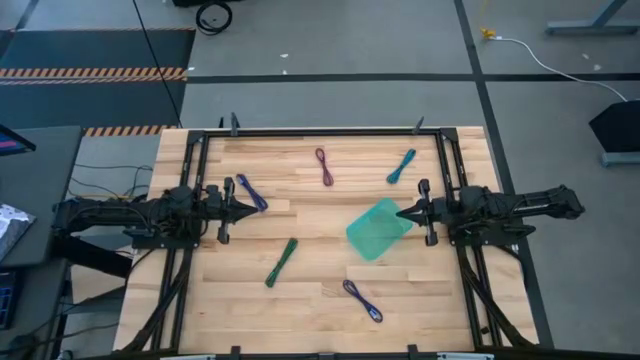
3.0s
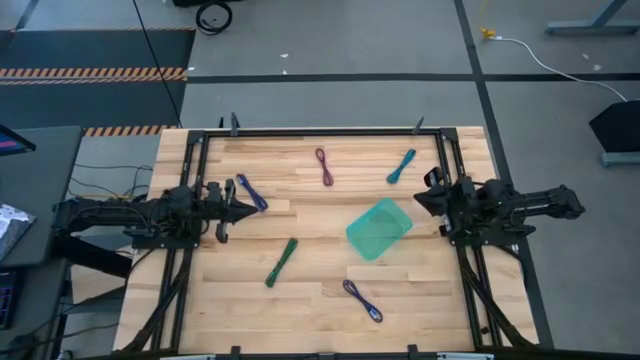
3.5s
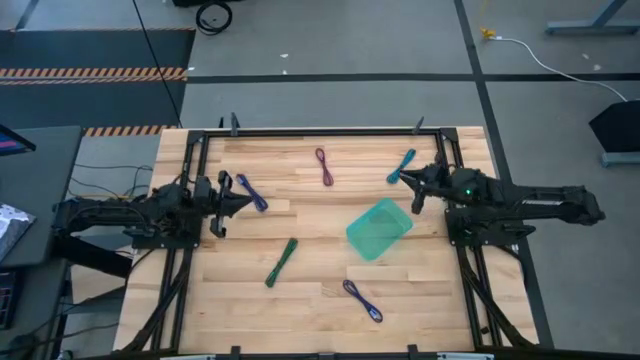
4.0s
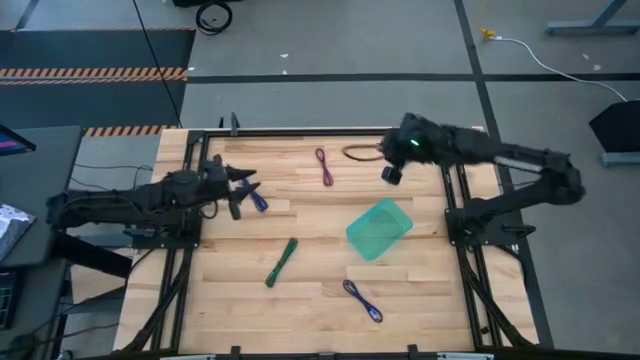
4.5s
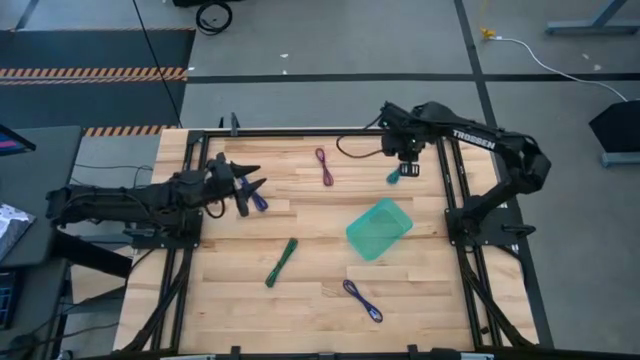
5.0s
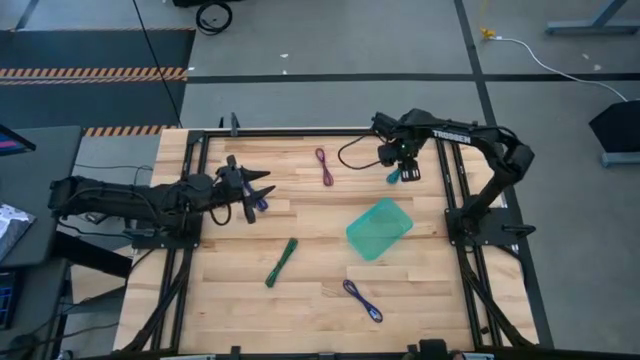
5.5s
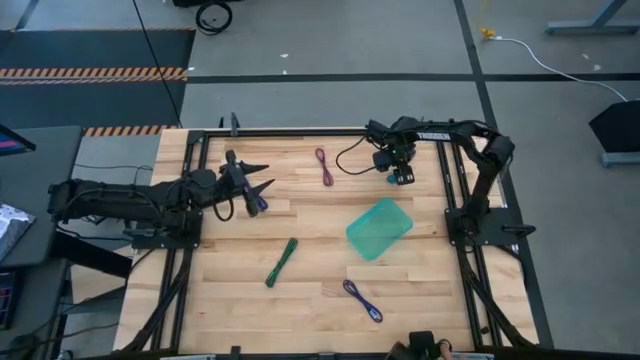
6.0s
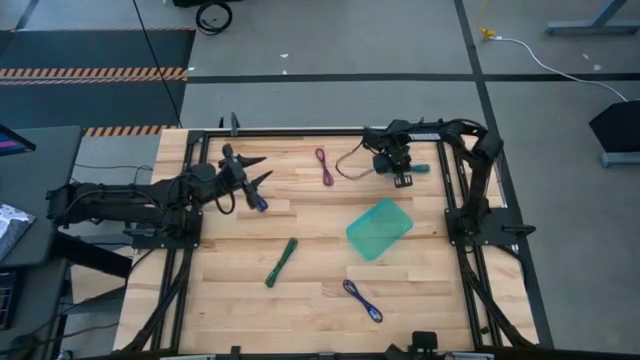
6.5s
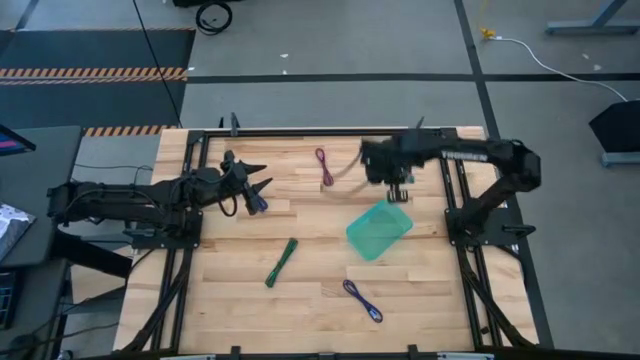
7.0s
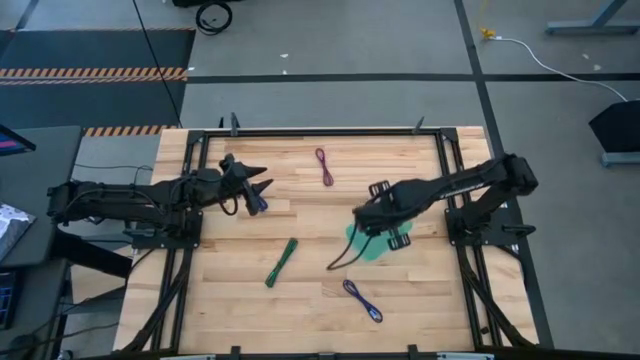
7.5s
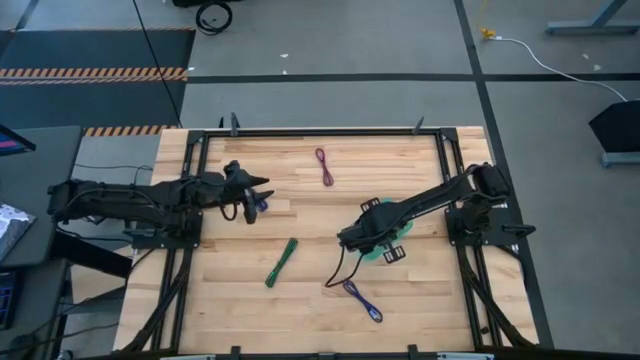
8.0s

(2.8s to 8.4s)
Task: Pick and place USB-C Cables
Put the light blue charger cable into the green bin

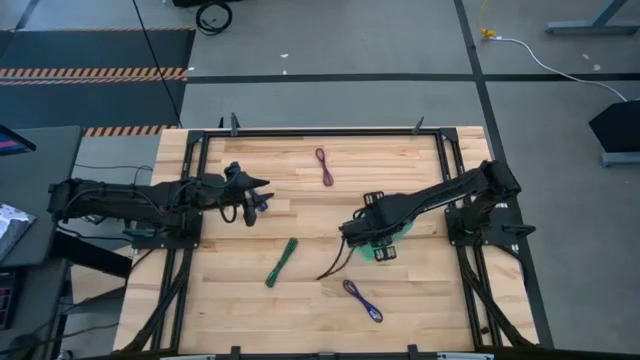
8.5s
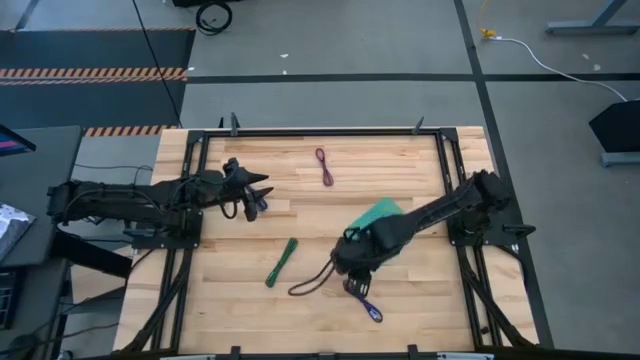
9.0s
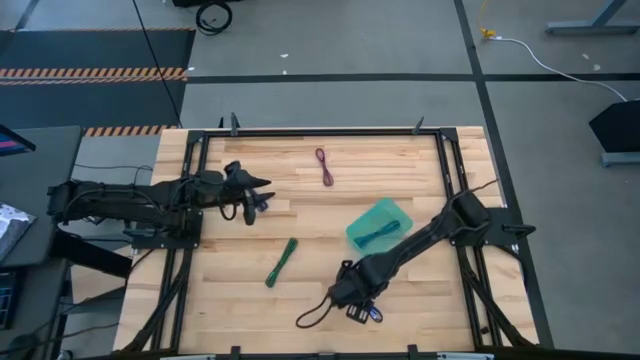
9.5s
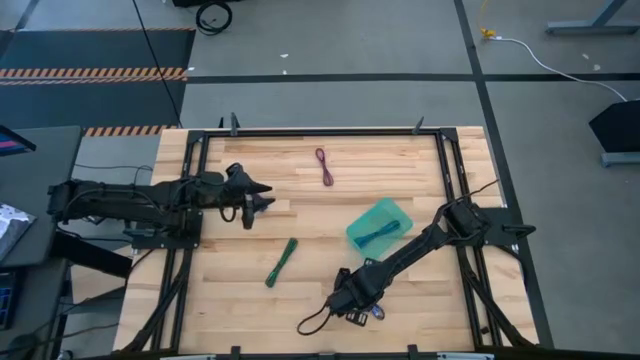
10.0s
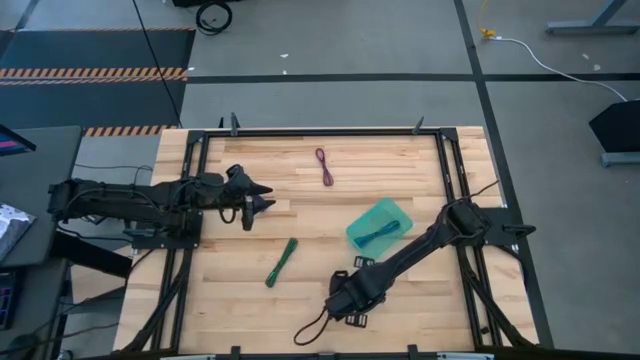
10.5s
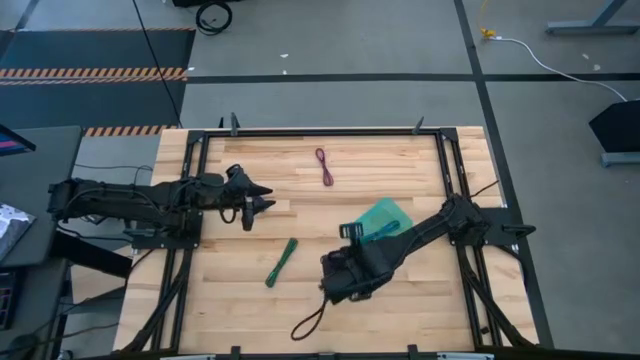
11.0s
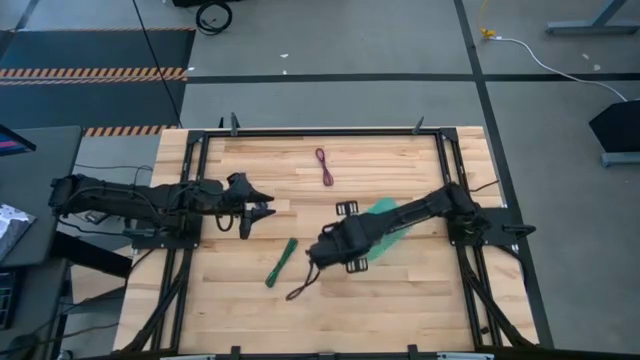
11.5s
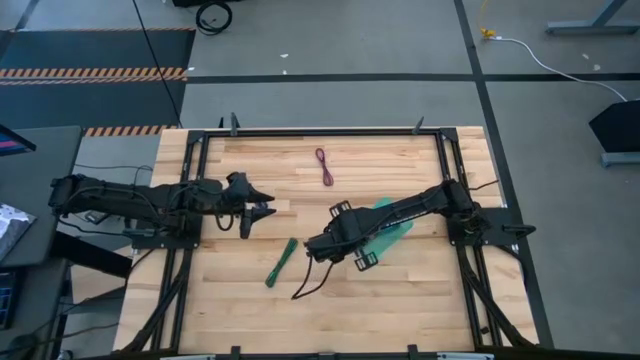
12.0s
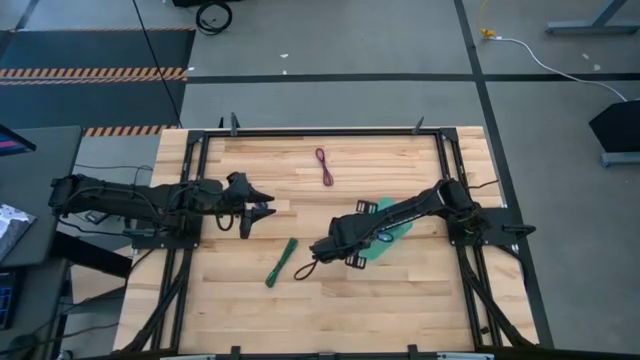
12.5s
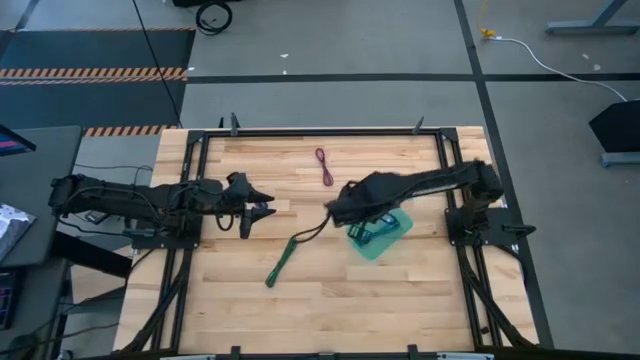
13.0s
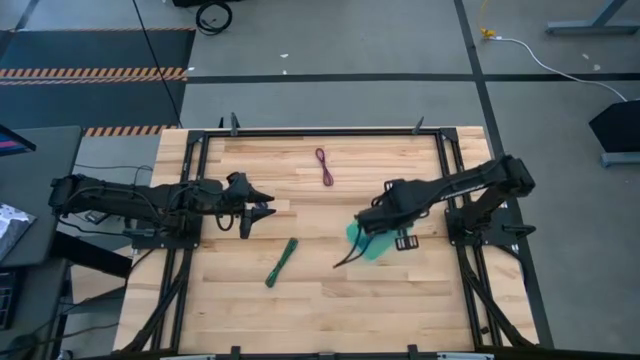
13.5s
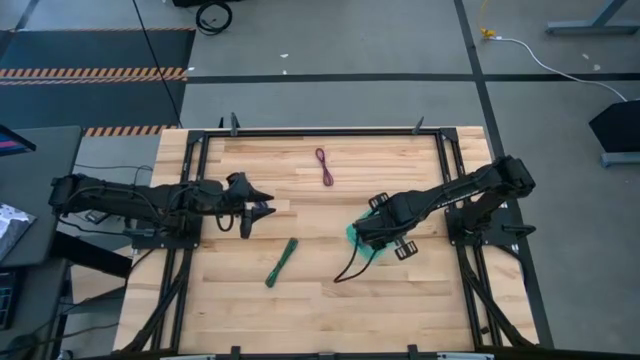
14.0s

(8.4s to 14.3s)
Put the blue charger cable into the green bin

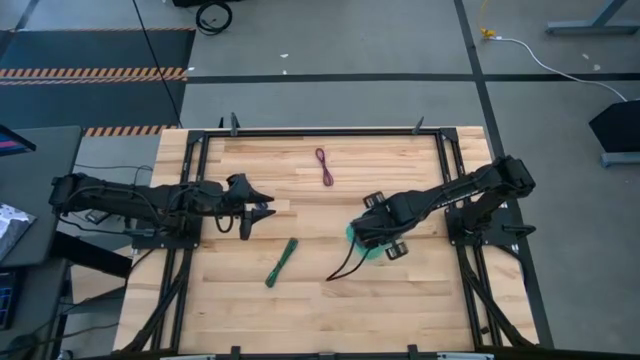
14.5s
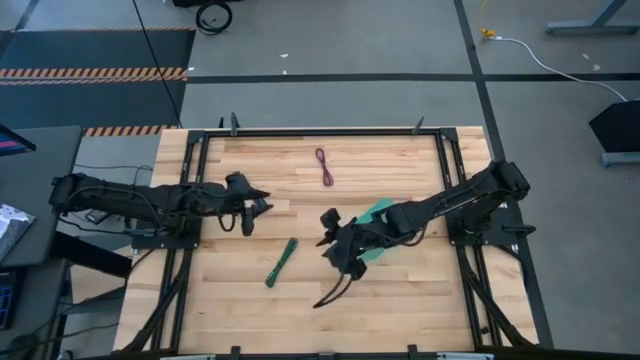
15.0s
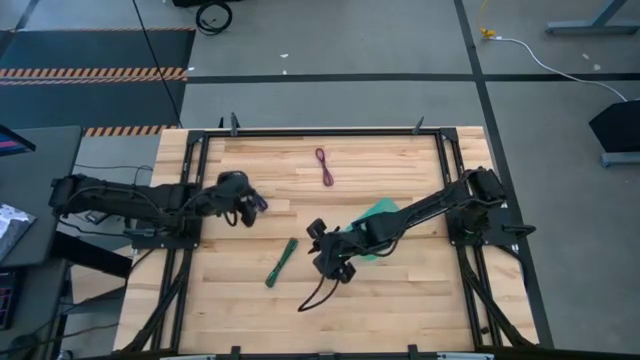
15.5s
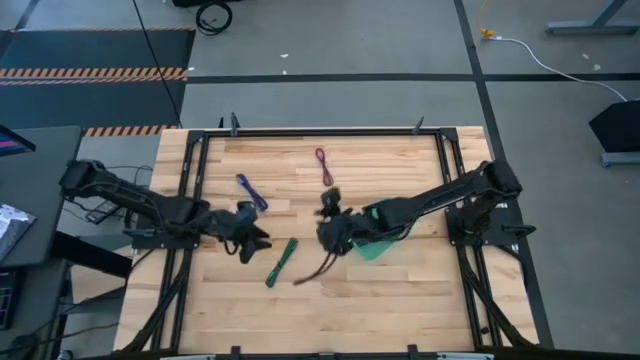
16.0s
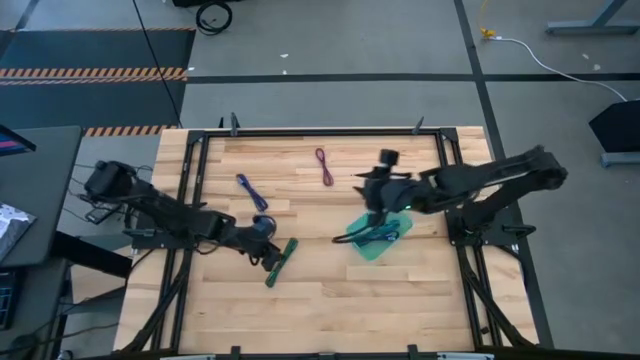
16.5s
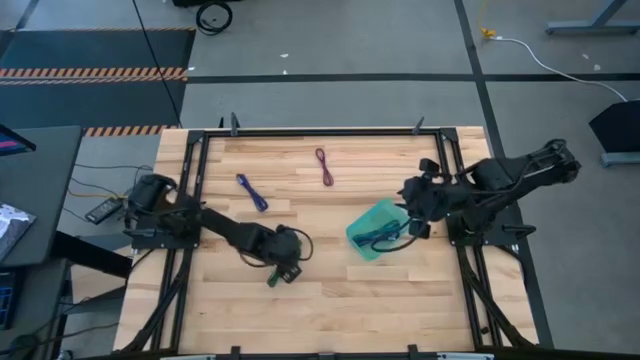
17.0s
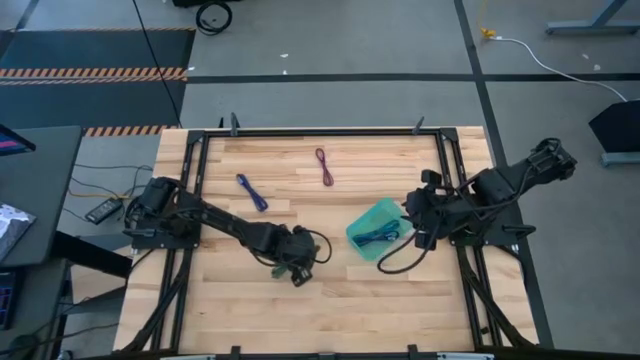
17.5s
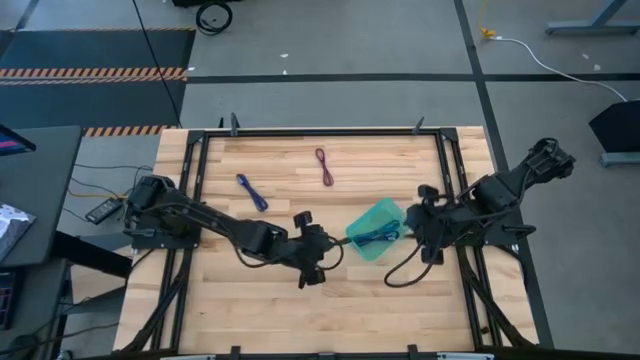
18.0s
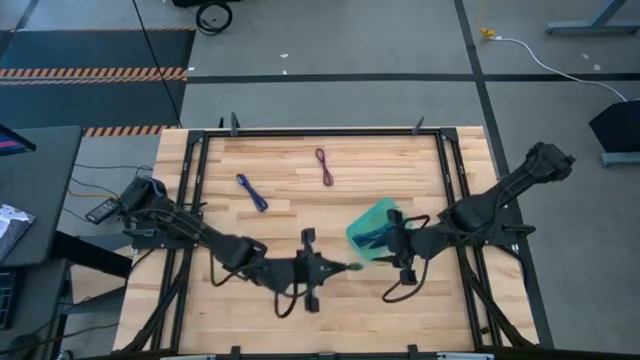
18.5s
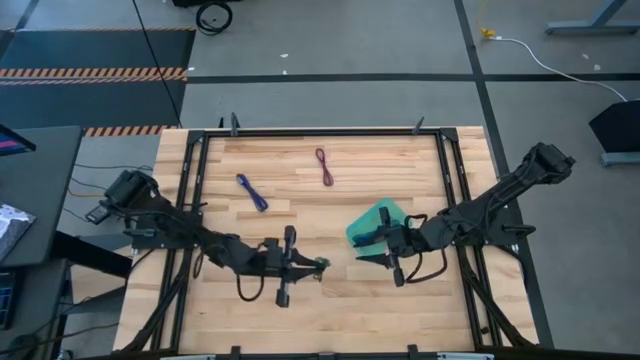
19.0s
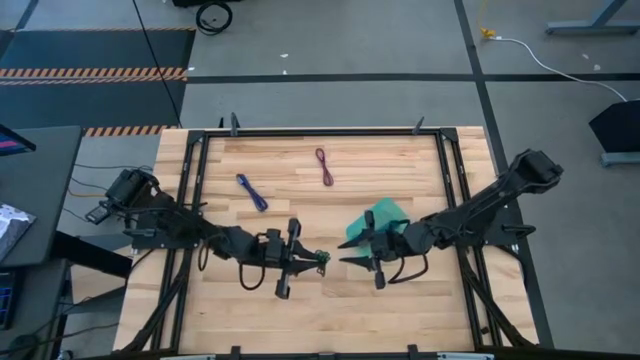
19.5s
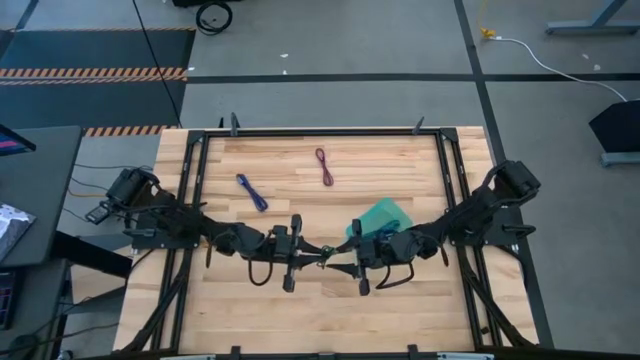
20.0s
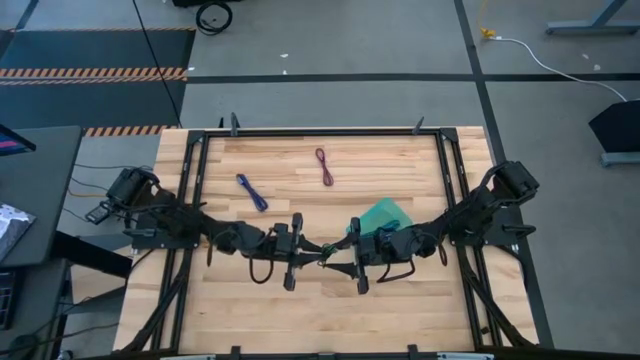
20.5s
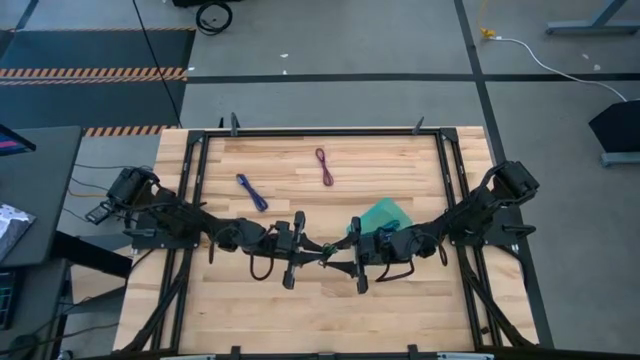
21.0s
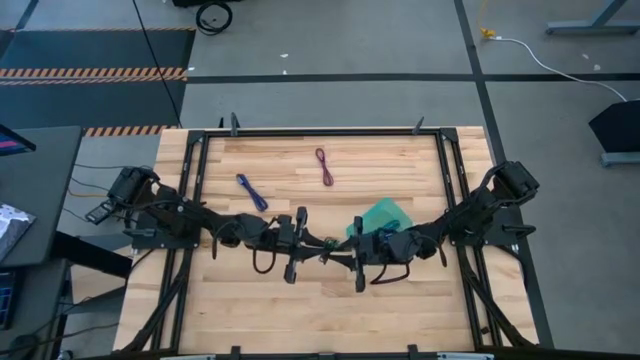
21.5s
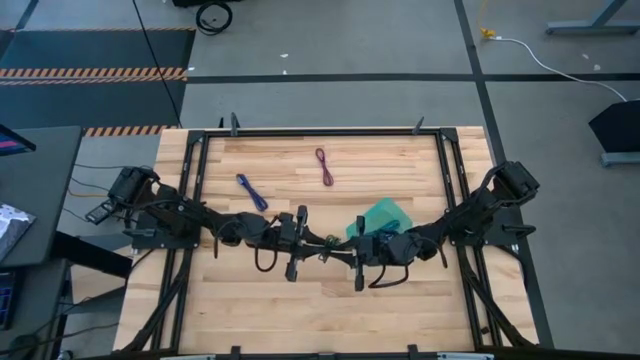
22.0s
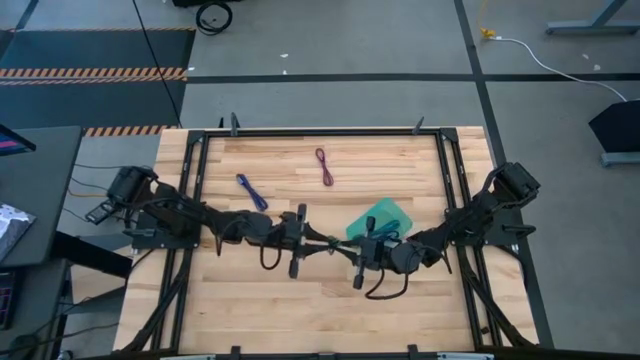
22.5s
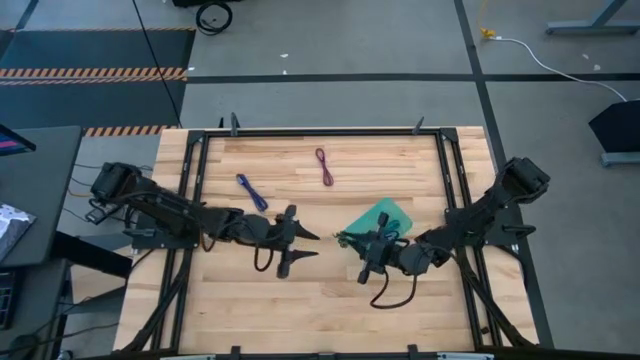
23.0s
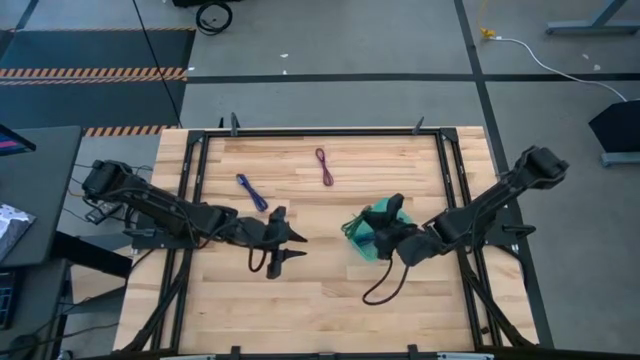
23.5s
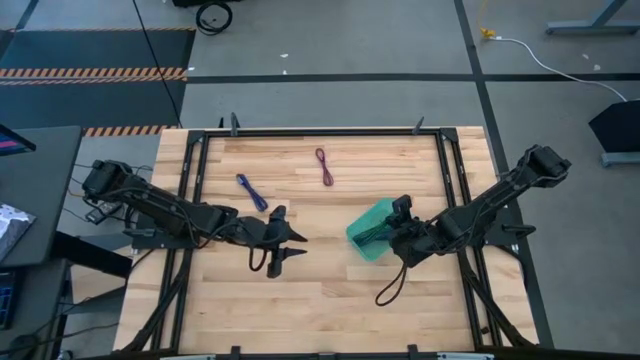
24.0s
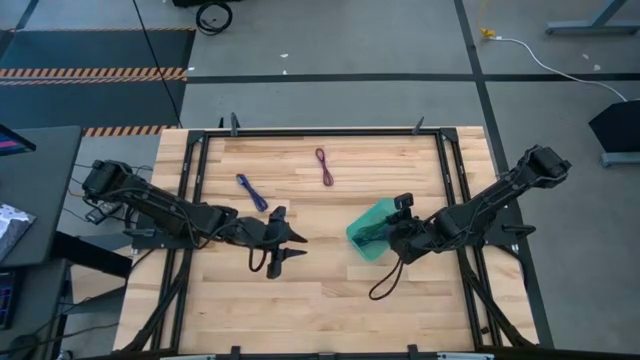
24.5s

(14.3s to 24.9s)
Put the green charger cable into the green bin
